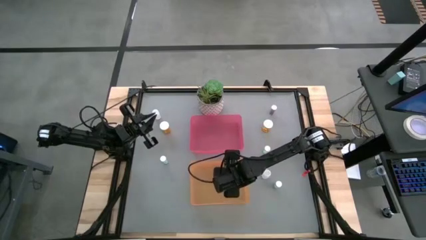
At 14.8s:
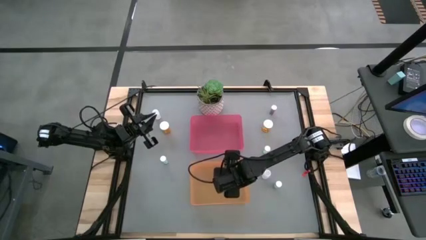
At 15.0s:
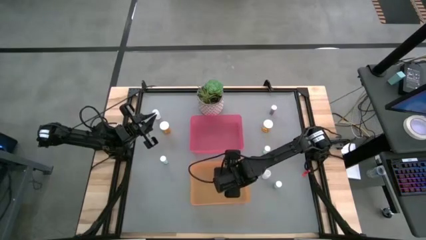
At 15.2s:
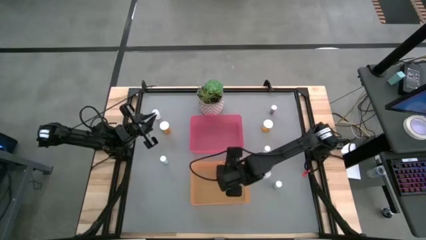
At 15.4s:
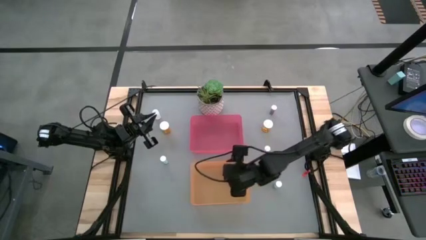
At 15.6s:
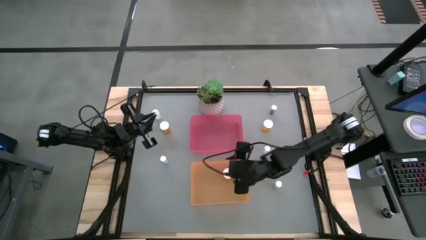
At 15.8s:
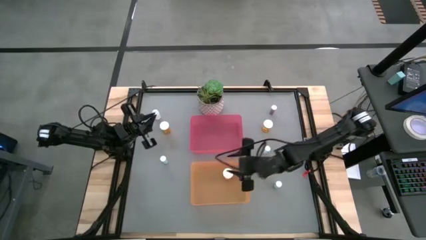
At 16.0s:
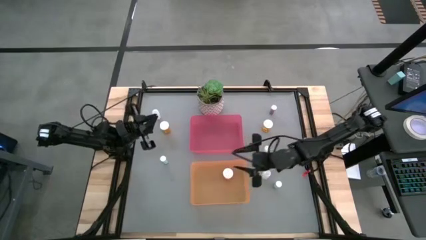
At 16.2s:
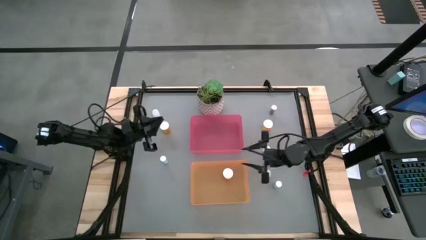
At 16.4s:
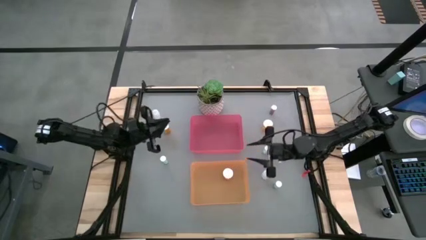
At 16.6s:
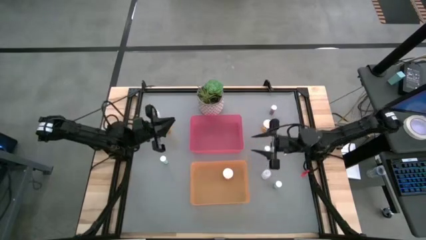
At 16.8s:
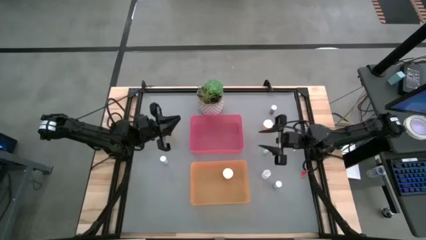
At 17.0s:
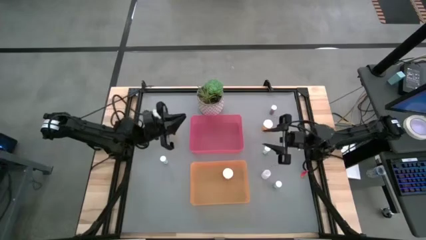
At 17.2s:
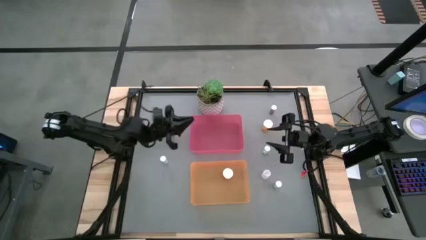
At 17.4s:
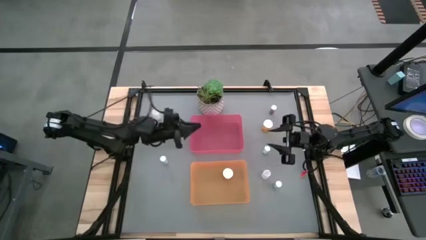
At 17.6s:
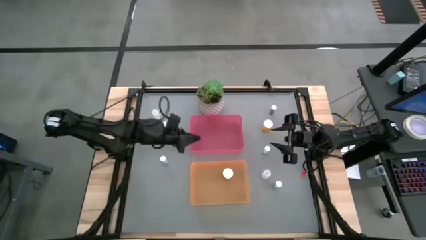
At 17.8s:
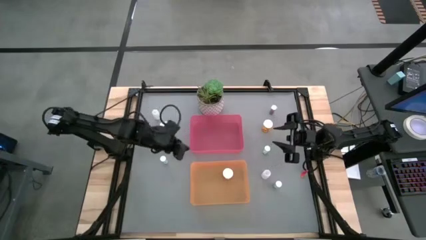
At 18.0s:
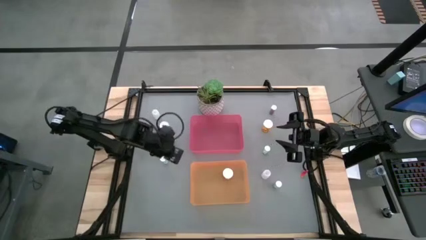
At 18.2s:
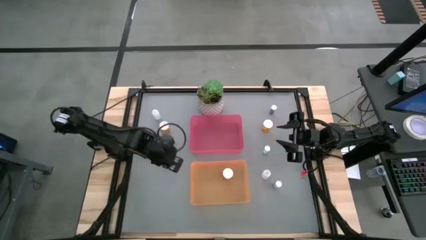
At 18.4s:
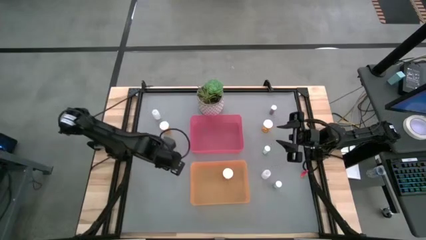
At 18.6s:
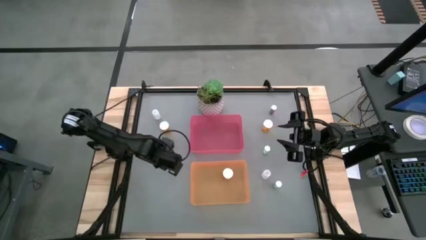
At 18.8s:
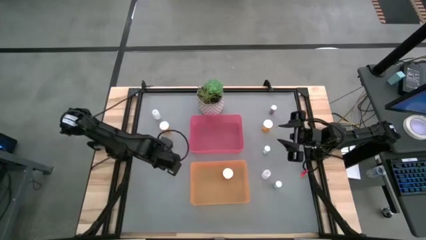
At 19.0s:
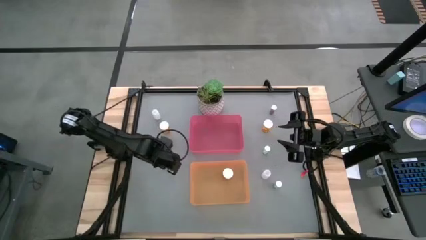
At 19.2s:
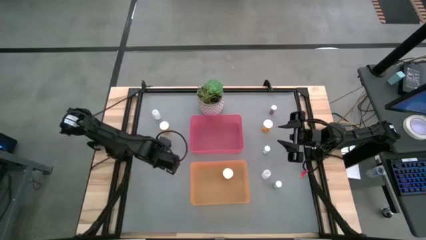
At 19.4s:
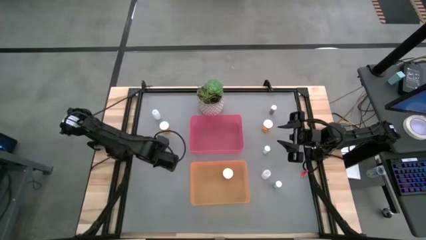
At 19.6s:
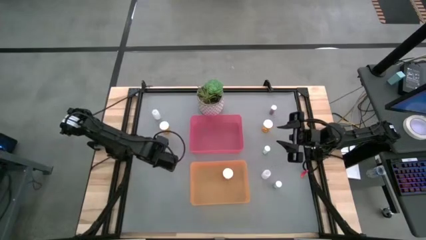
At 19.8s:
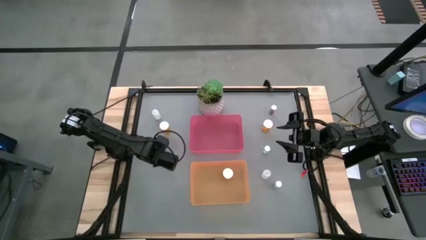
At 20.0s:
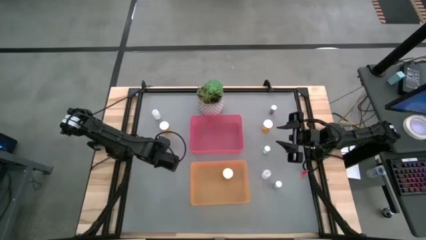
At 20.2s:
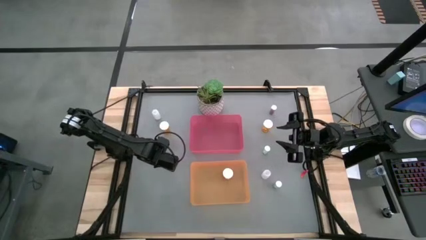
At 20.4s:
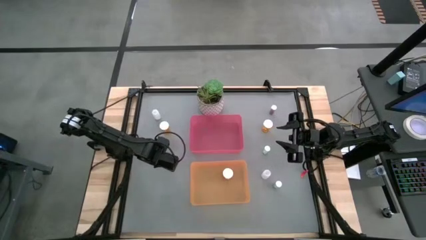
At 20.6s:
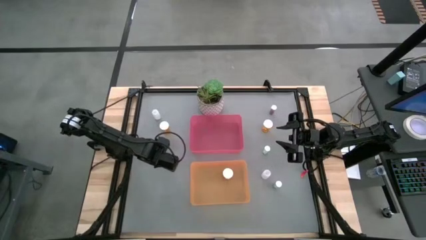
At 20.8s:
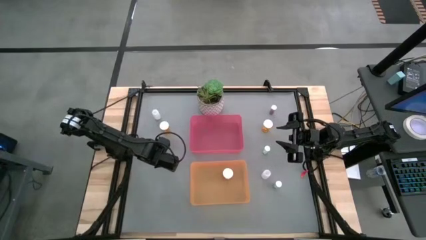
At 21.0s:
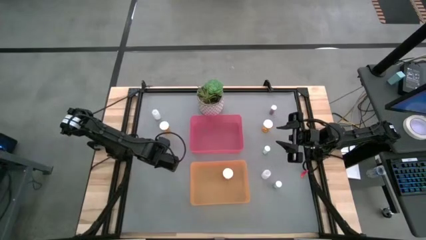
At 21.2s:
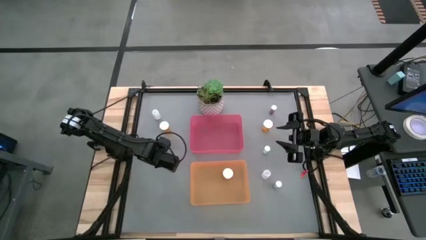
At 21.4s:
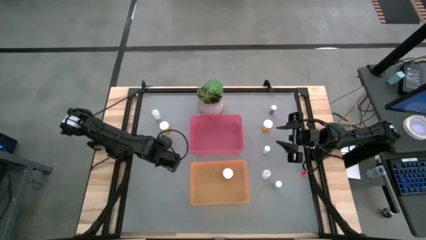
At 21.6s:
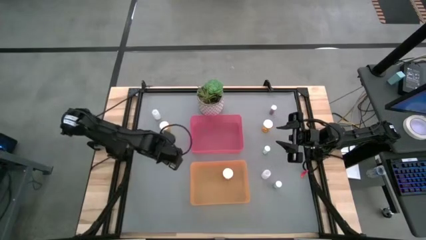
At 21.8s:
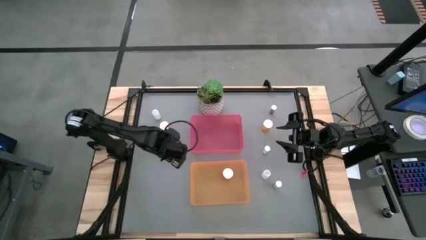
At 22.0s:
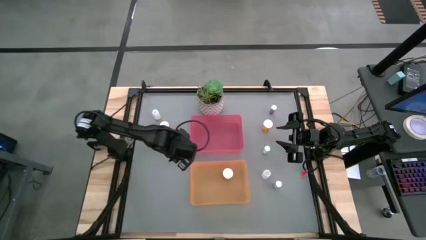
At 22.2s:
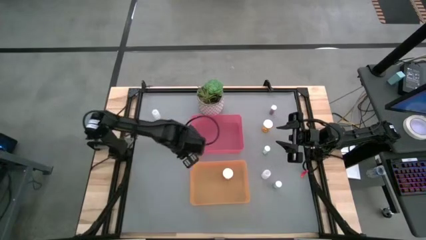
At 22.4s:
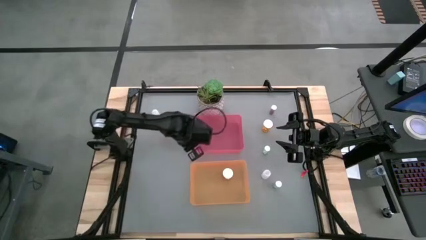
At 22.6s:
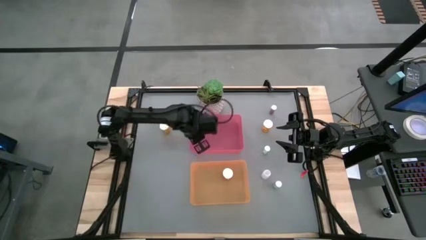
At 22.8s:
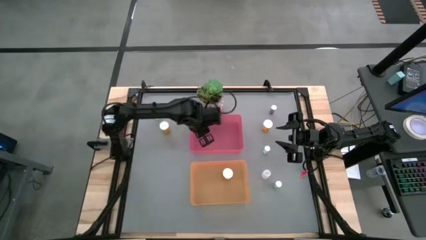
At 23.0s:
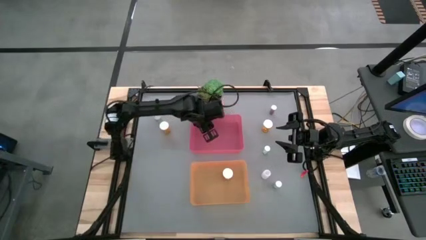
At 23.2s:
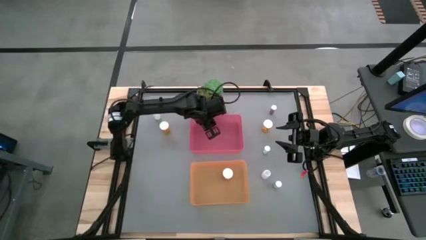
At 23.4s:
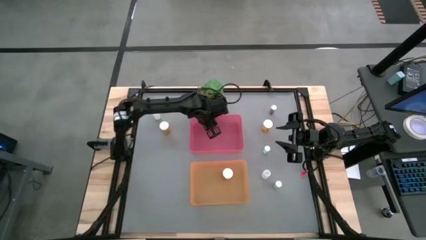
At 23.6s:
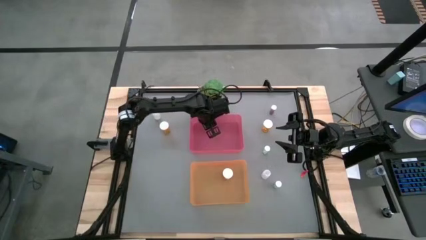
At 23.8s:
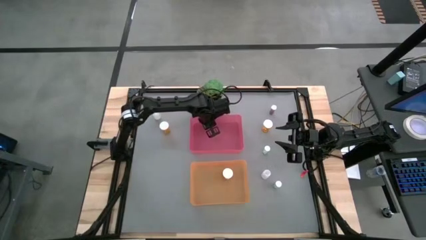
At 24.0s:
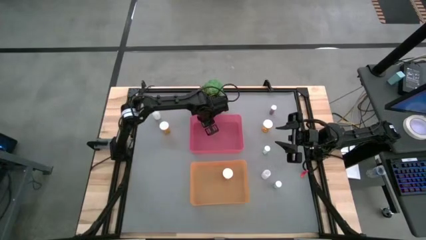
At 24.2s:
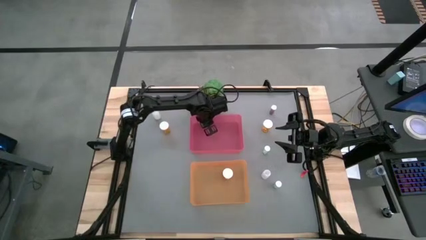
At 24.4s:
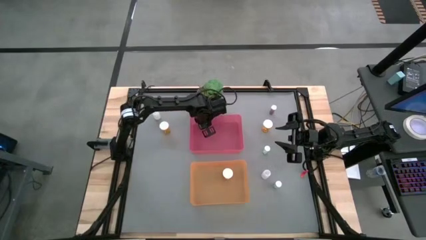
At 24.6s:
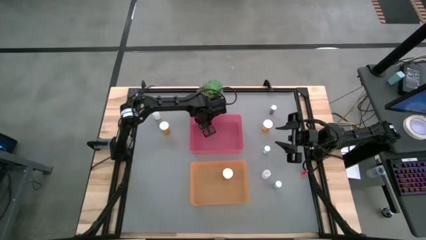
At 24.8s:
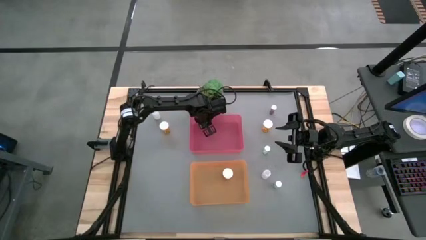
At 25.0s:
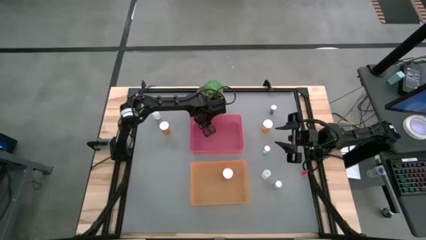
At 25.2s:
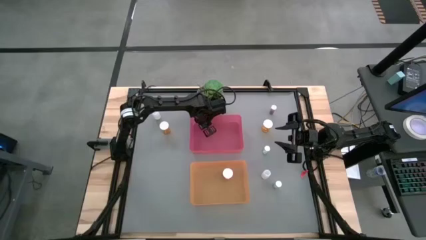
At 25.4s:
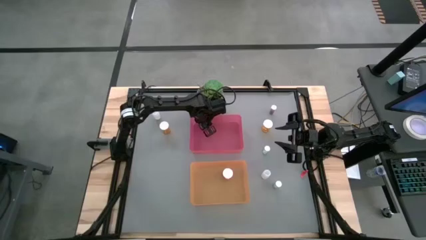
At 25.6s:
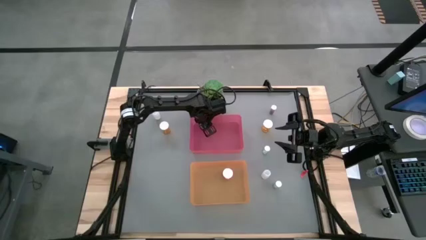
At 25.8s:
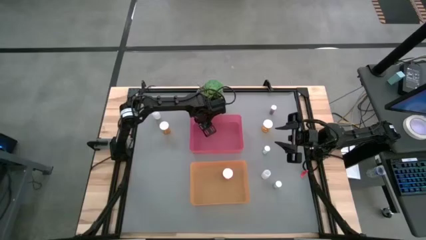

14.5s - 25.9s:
Task: Pick and place medicine bottles into bin by pill shape (circle, oval)
Put the top left blue tablet bottle into the pink bin
